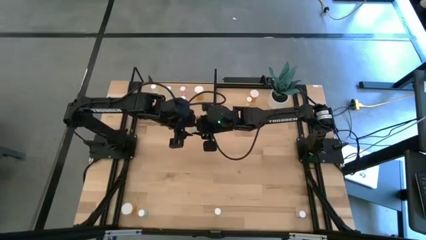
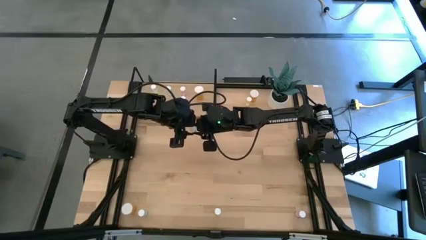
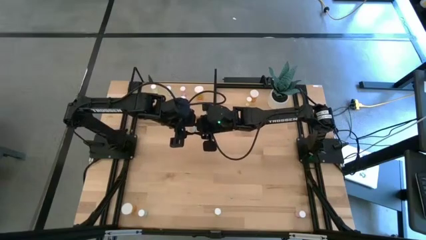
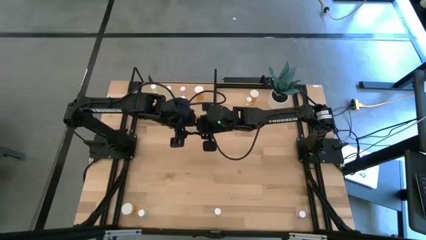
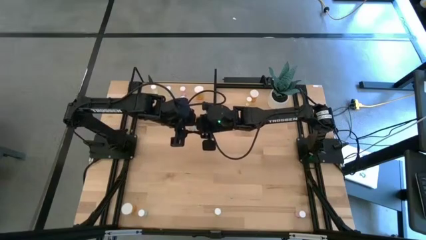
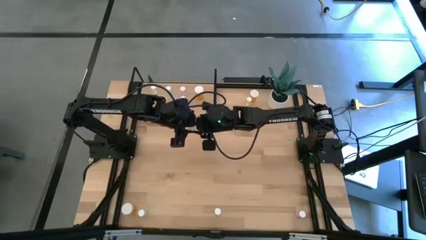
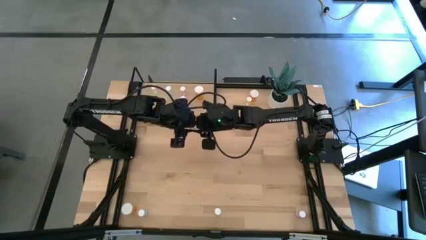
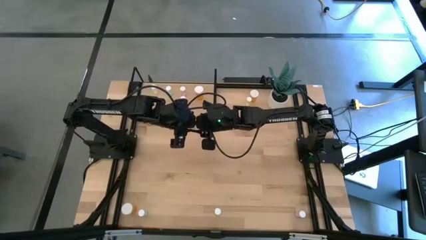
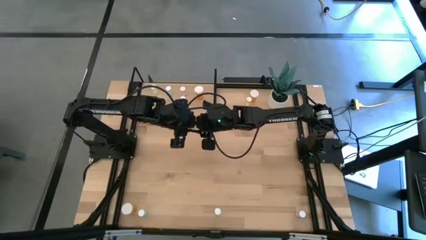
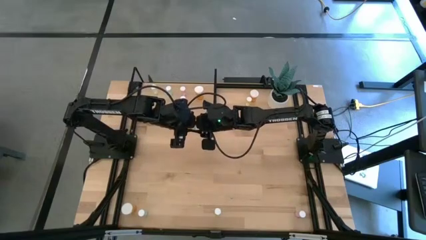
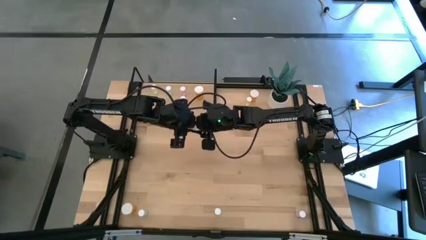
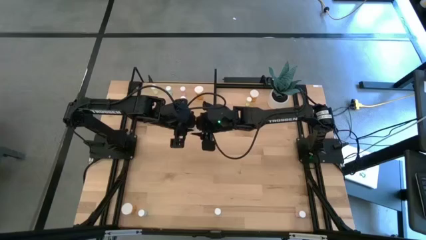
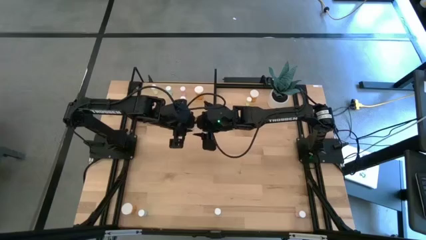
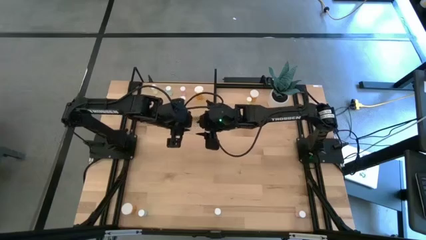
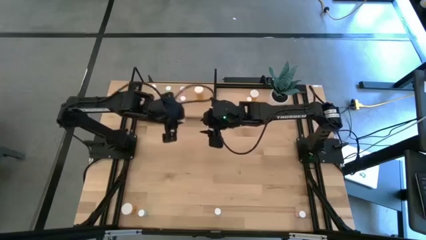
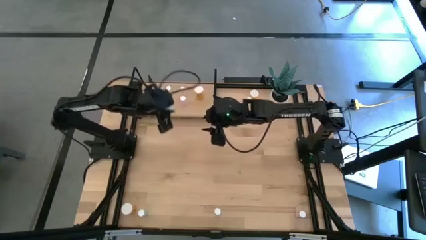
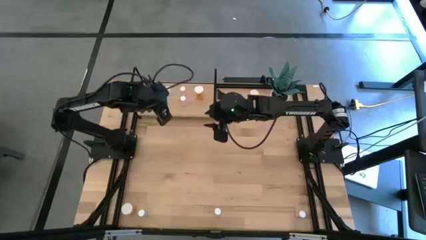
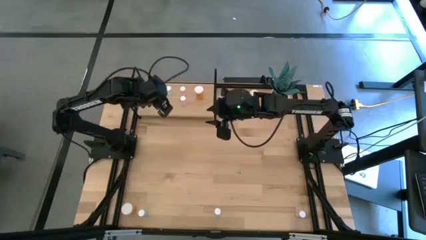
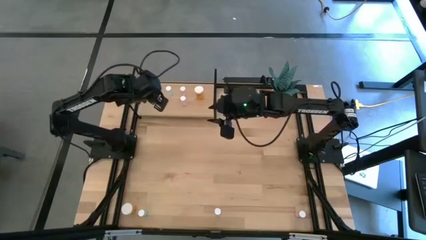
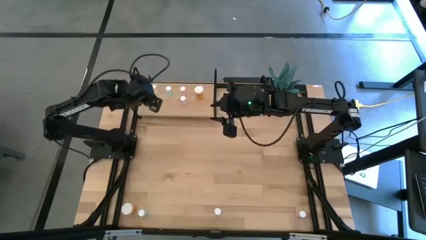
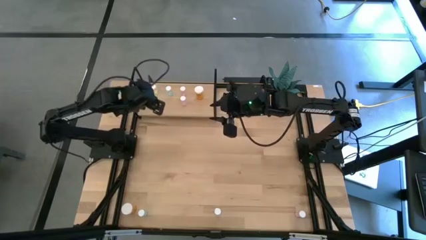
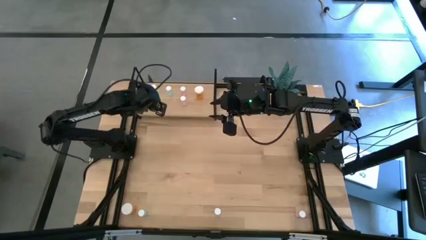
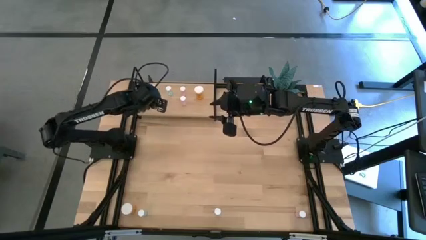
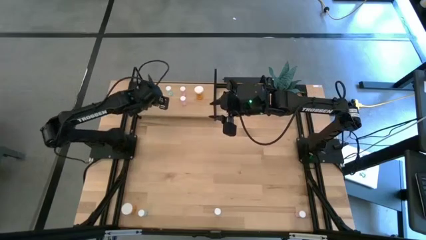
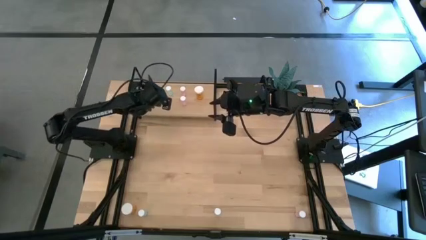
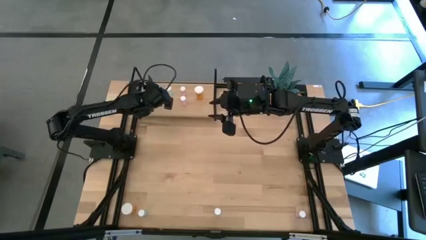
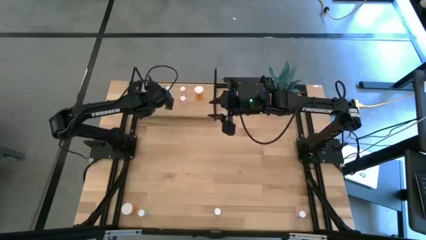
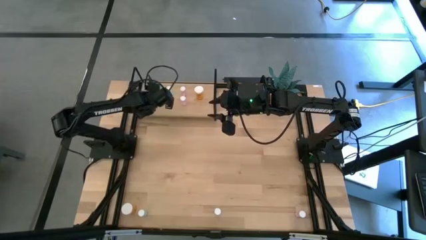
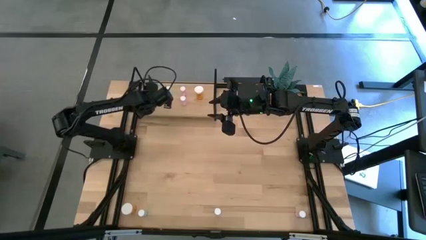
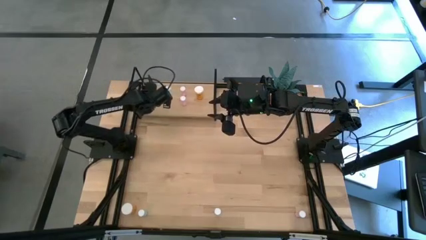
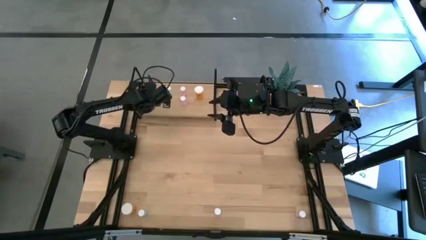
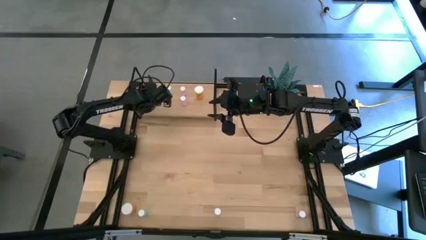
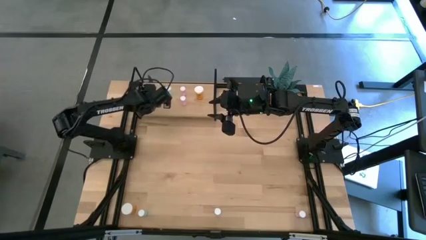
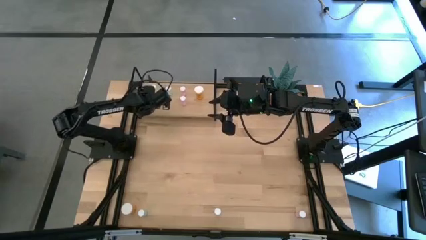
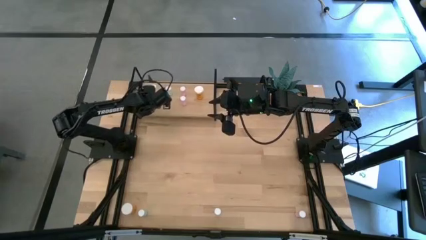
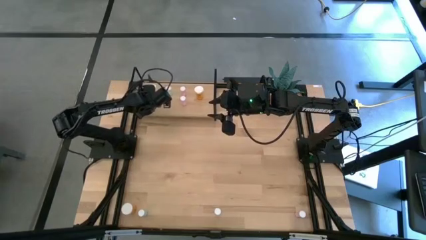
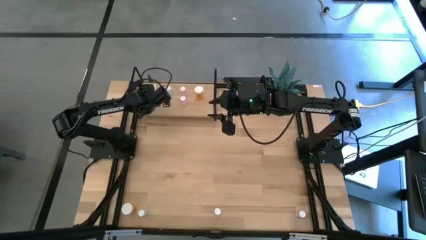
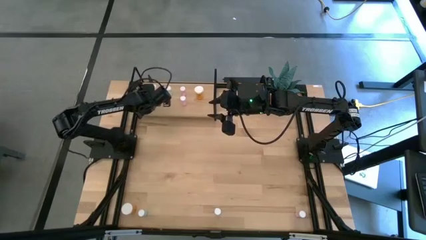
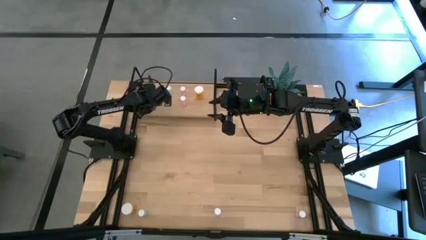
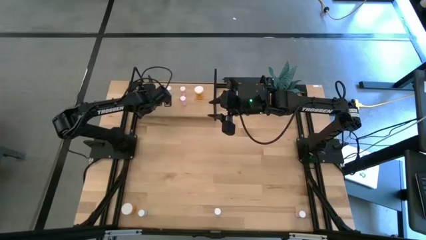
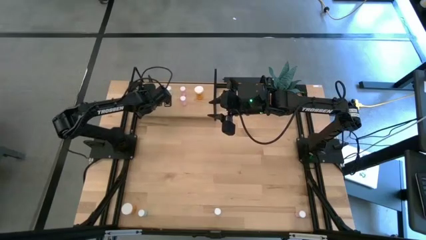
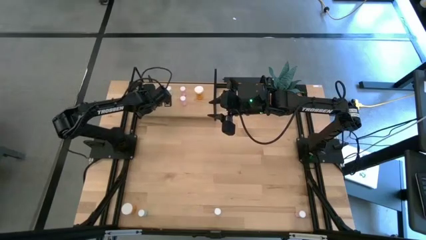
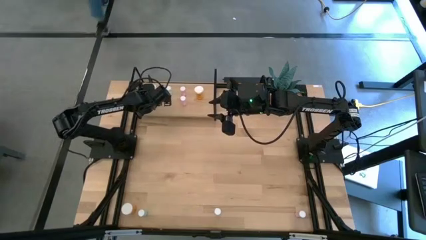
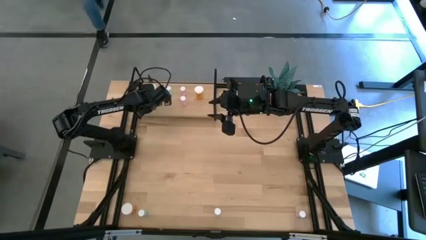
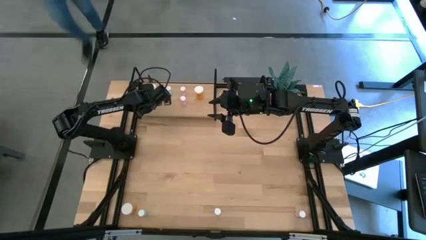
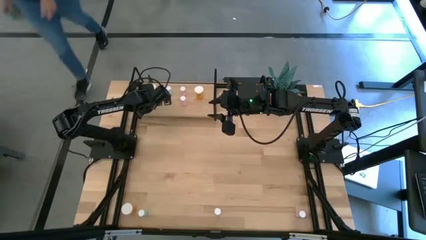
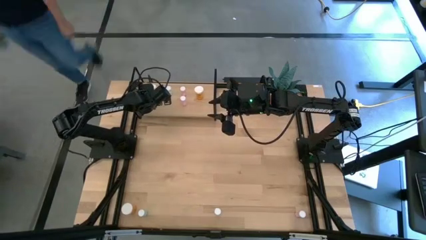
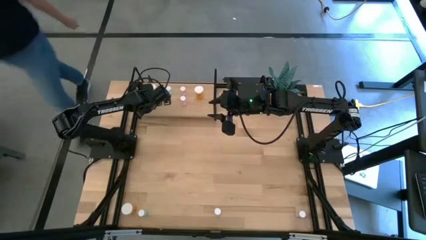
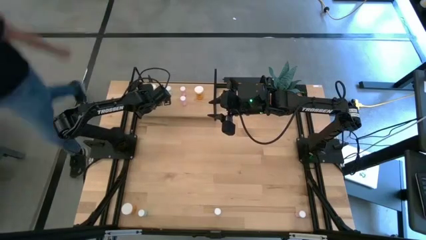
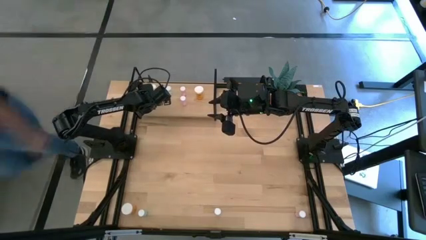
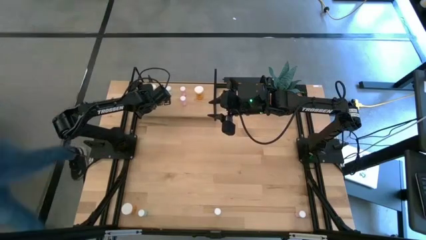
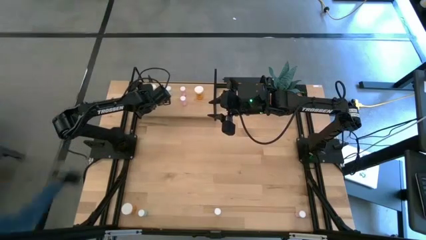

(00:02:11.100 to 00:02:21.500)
Task: Pick and place medicine bottles onto shelf by color
Put the bottom yellow pill bottle on the shelf and align it with the other yellow pill bottle

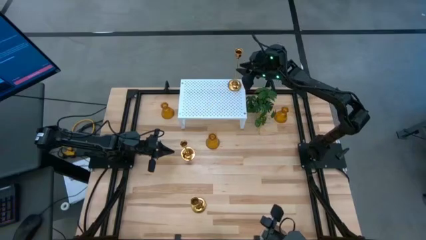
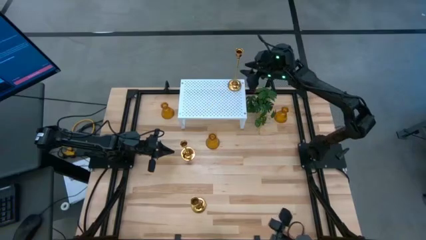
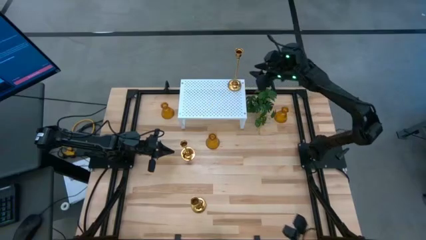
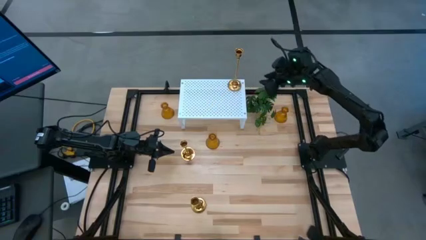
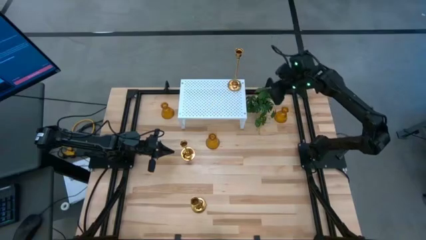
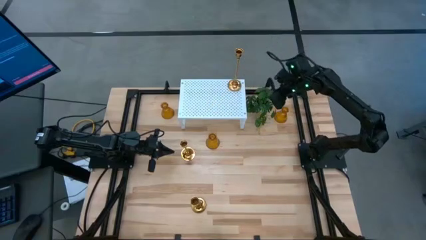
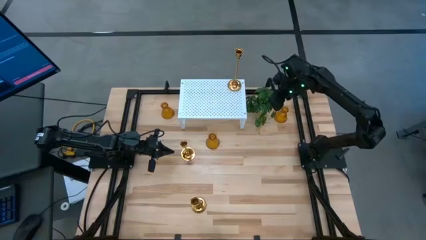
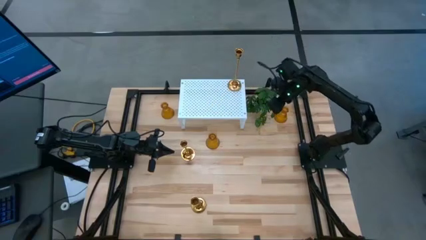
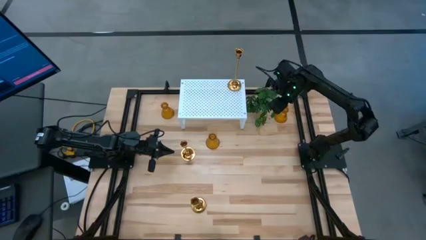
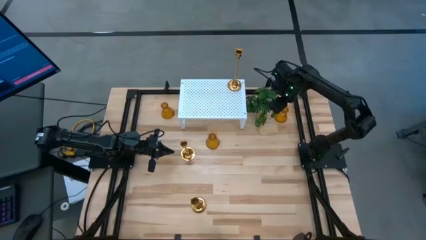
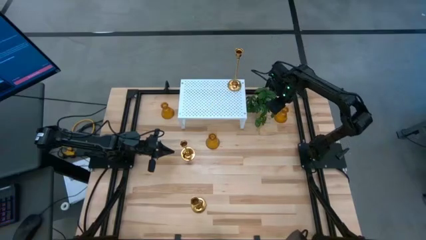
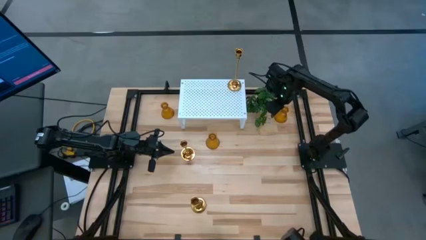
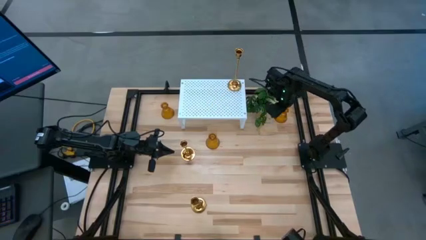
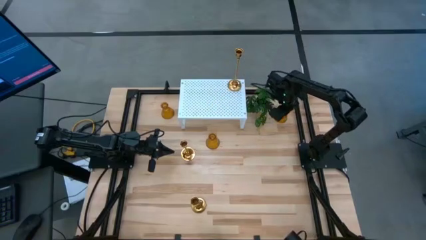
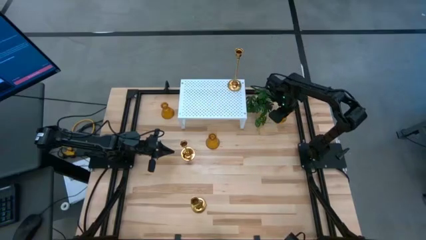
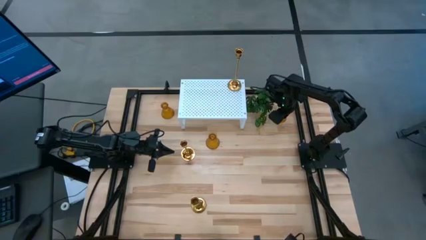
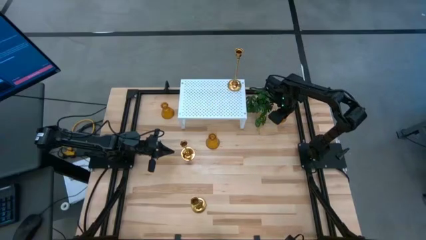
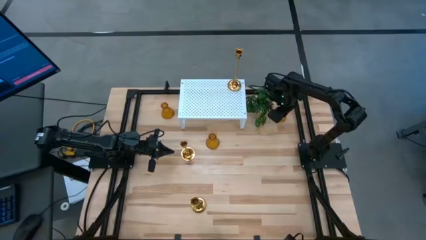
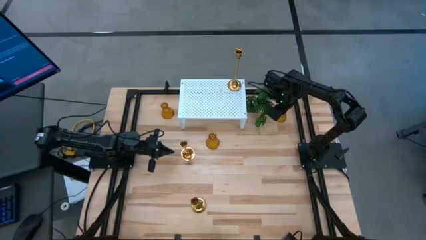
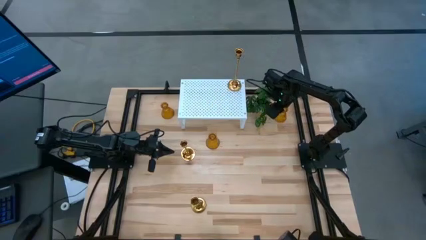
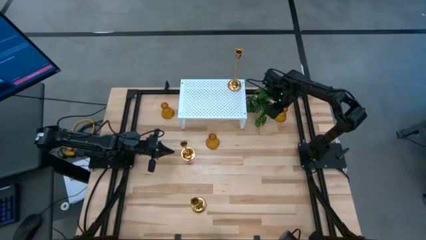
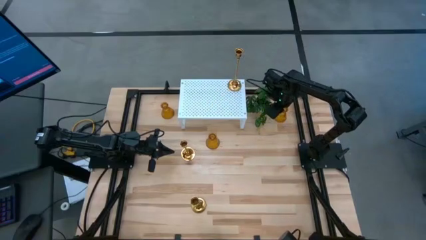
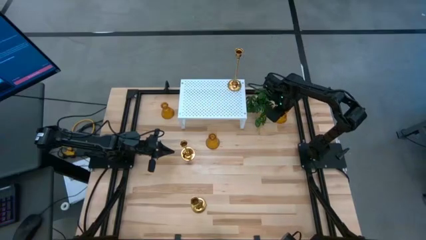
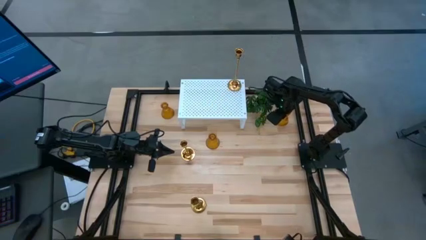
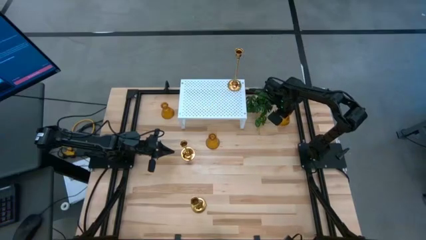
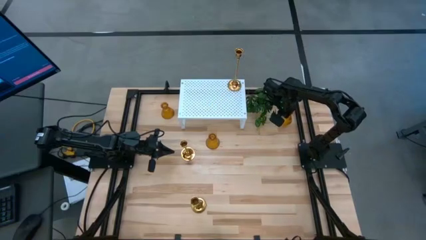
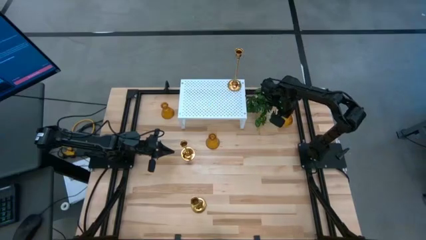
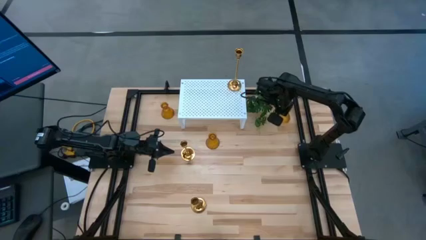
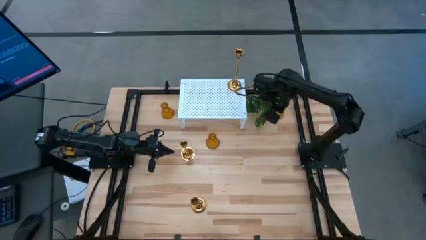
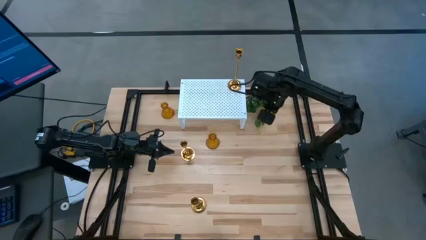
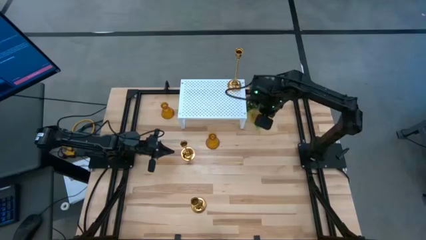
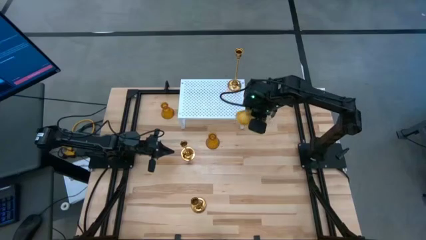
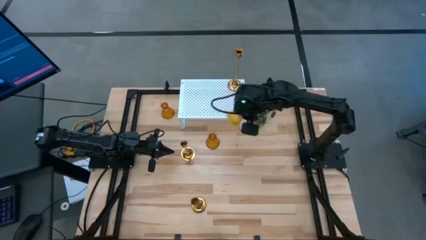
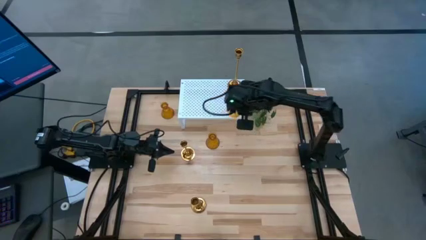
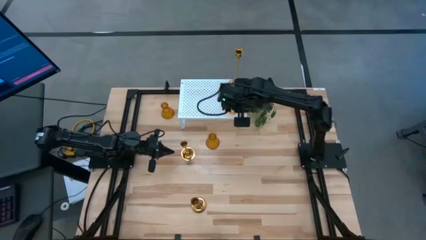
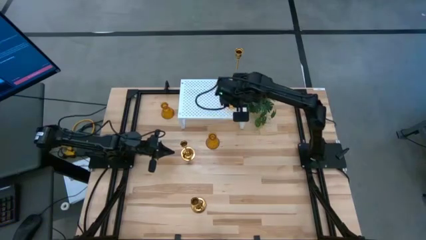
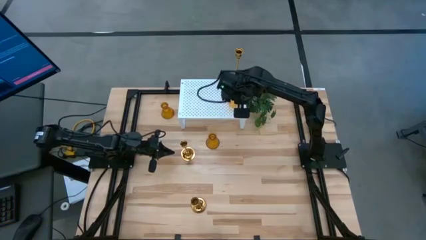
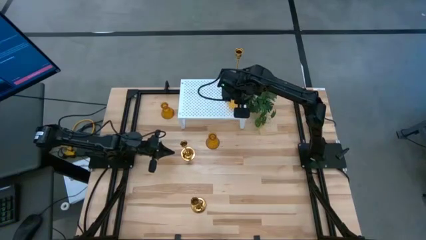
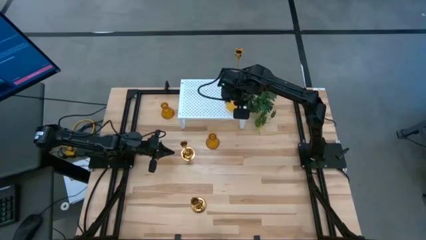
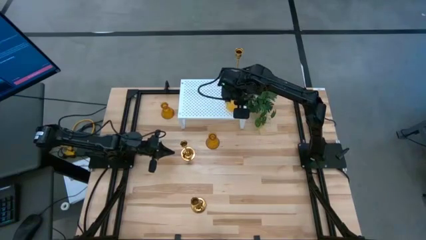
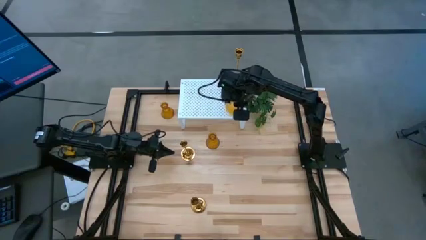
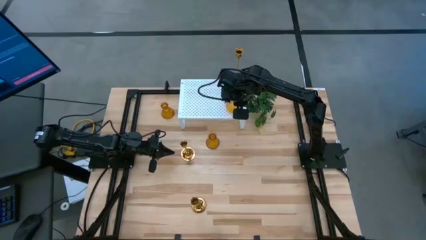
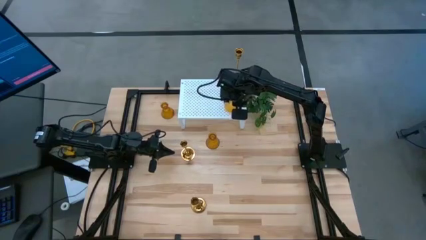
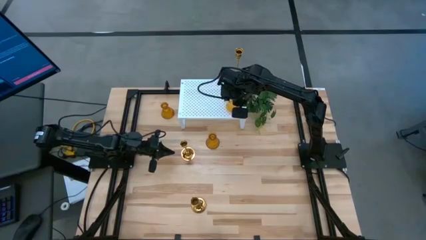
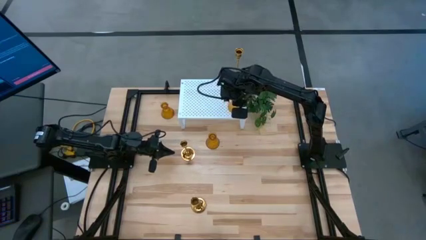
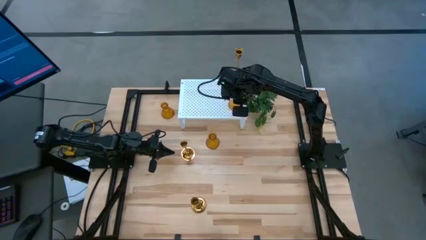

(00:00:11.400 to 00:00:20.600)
Task: Pick & Place candle stick holders
Put the right gold vase on the shelf
